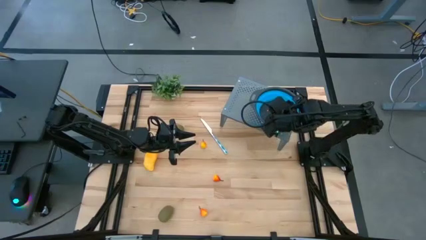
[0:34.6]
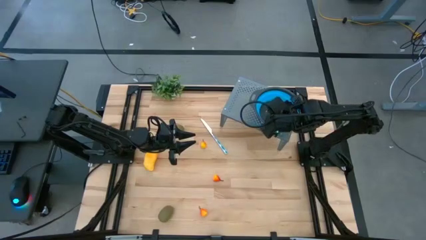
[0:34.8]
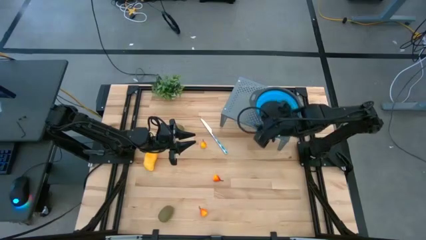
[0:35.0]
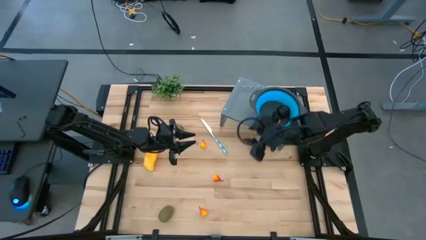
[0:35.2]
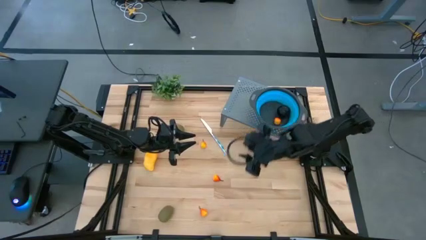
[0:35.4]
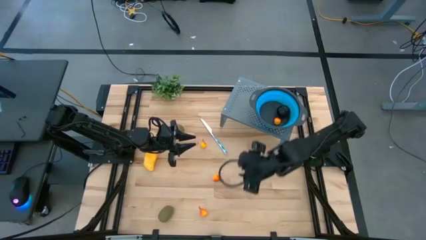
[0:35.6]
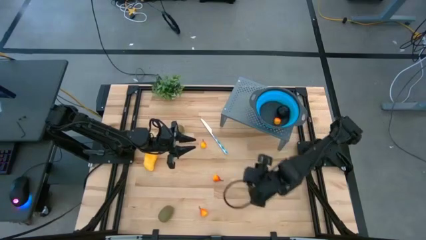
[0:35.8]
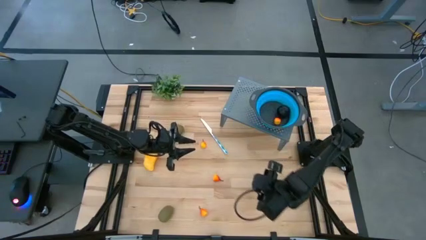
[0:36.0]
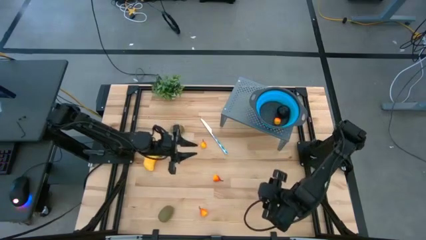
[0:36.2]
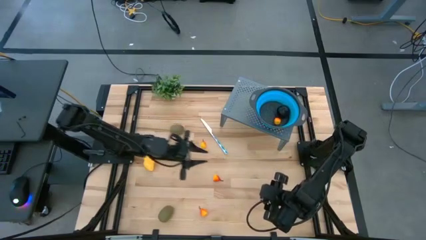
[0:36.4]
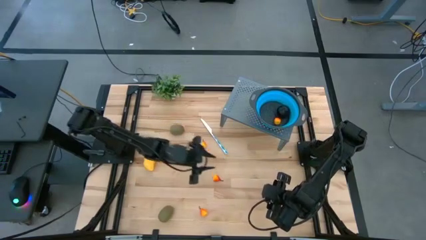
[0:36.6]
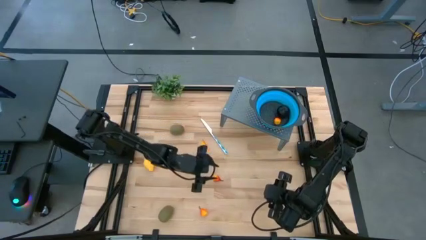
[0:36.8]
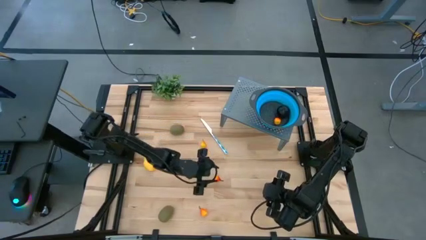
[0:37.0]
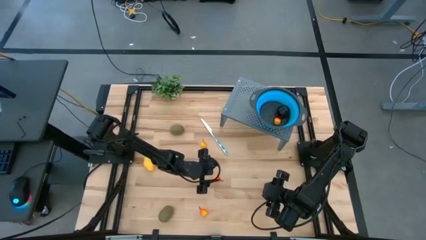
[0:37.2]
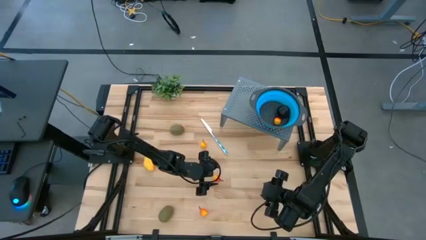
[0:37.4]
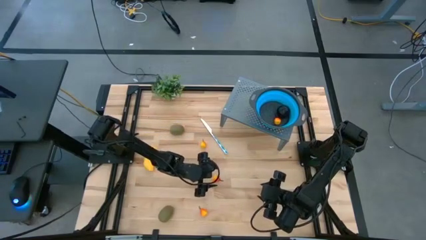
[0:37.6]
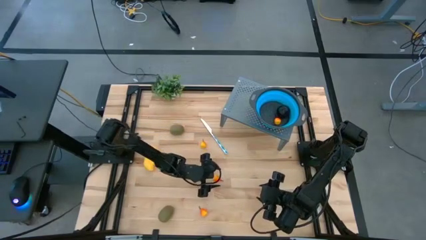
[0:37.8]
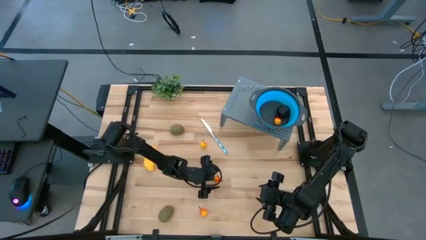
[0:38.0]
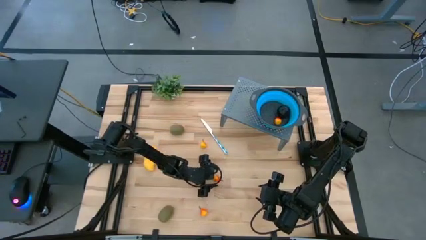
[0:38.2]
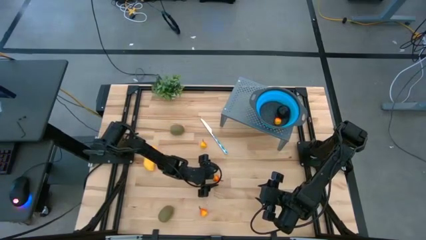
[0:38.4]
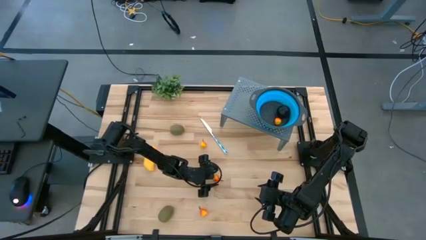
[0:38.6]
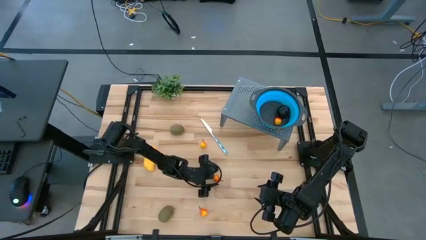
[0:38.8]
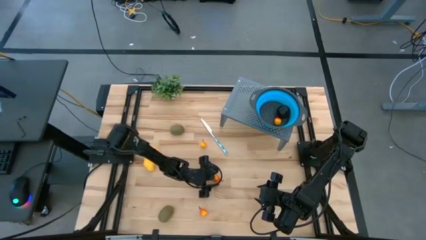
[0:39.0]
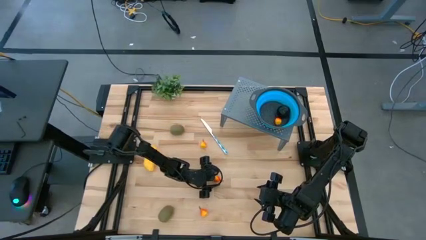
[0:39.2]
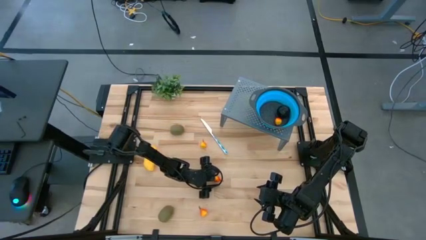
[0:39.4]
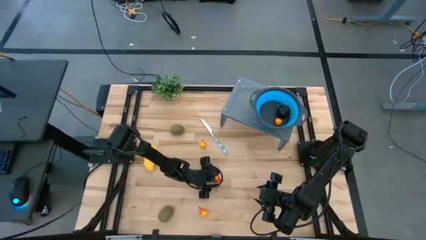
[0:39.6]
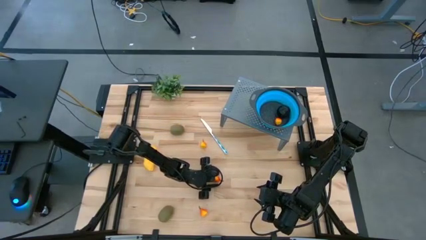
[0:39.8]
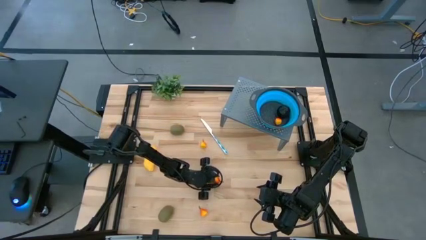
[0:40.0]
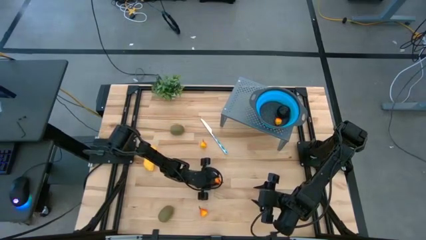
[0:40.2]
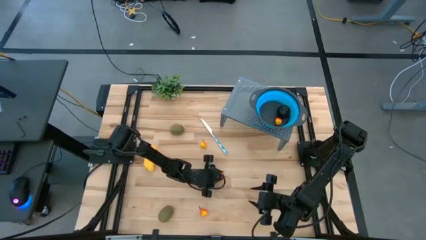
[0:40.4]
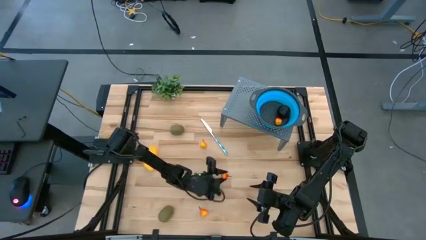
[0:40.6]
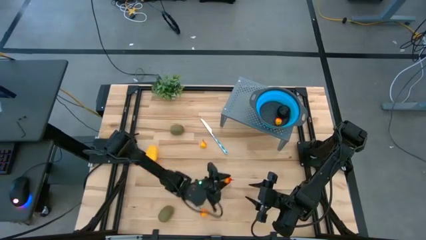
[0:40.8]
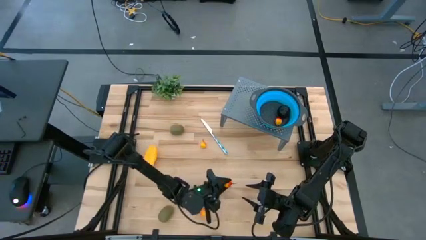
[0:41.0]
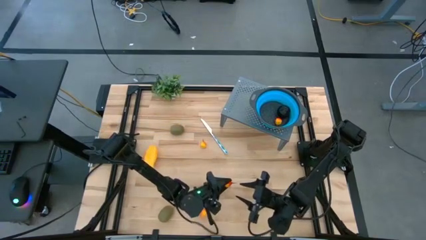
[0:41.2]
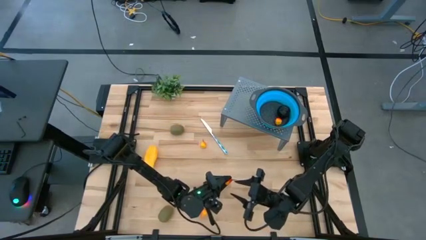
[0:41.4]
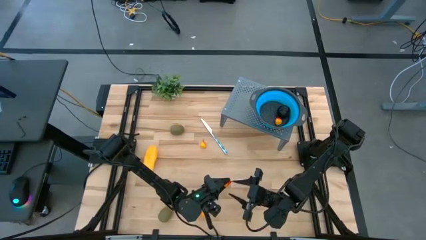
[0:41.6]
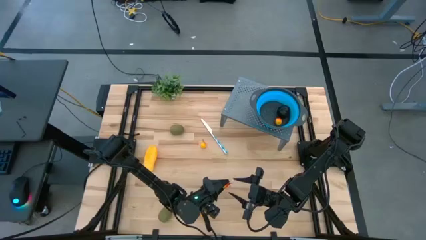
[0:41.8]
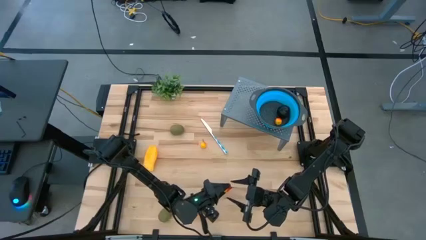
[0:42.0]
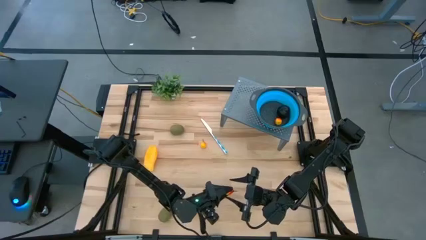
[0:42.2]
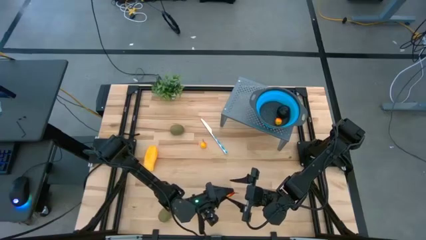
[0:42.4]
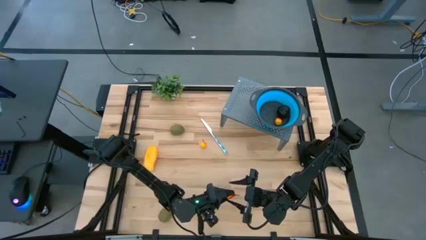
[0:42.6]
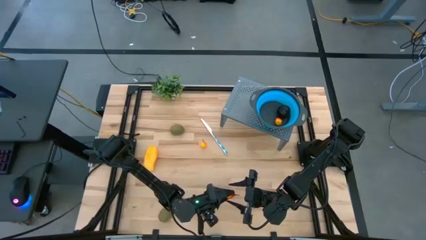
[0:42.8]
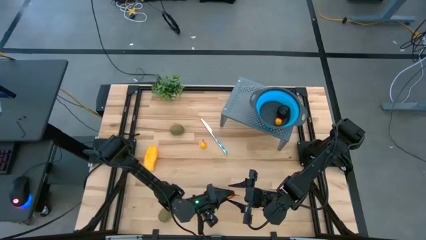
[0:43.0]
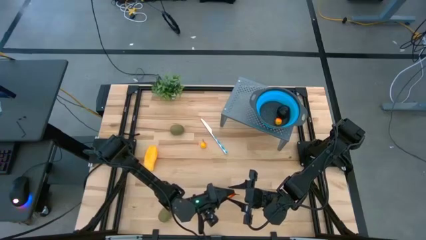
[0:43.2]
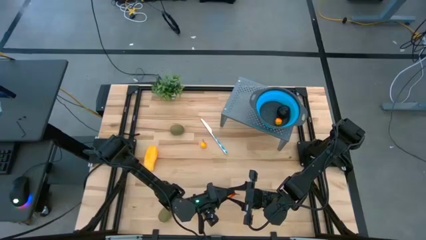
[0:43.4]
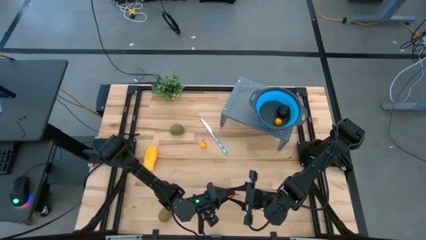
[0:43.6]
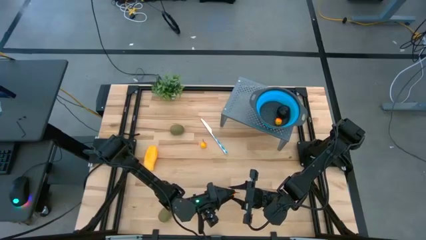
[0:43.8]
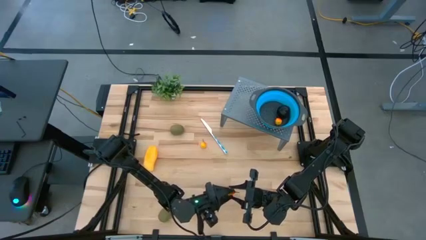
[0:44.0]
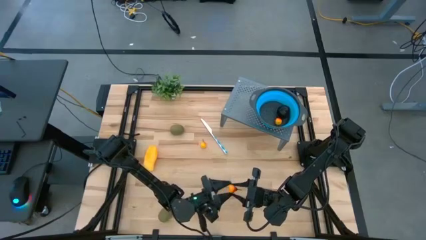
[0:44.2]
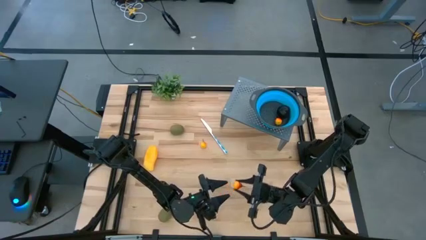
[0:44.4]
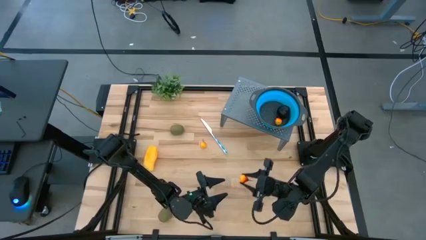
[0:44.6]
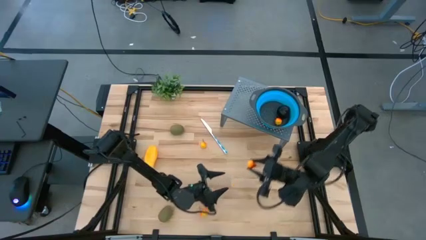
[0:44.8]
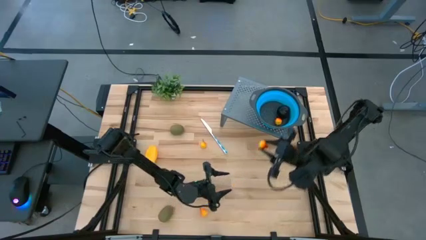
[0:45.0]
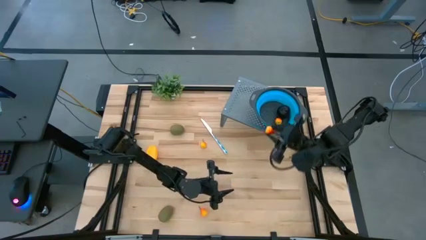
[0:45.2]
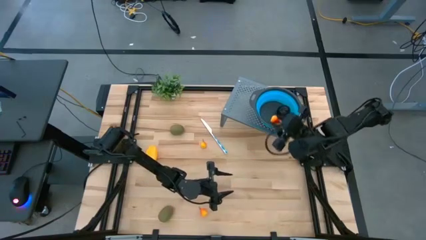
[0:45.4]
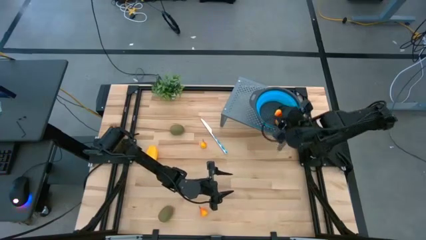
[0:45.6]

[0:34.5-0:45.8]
Task: Pick & Place Fruit
Put the peach into the blue strainer bowl on the shelf

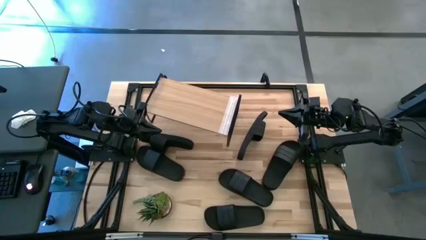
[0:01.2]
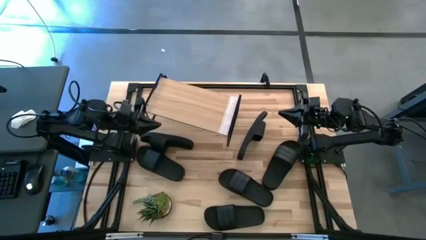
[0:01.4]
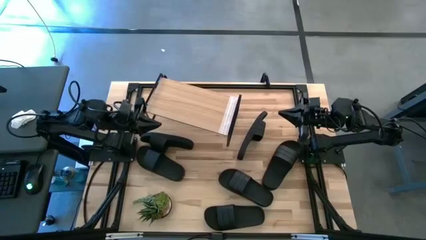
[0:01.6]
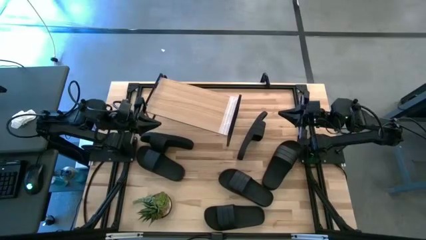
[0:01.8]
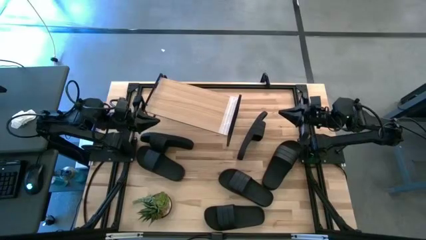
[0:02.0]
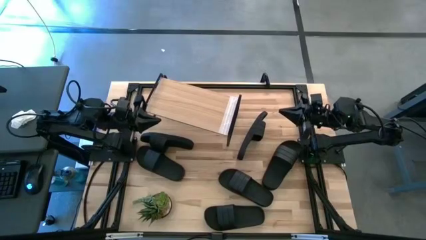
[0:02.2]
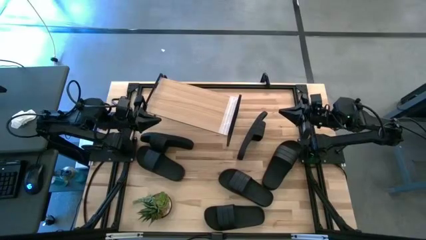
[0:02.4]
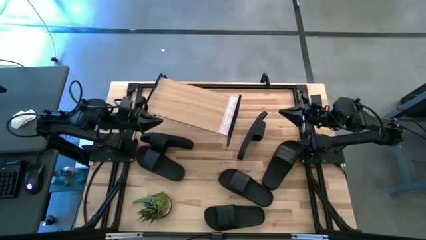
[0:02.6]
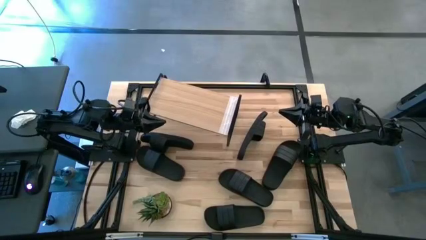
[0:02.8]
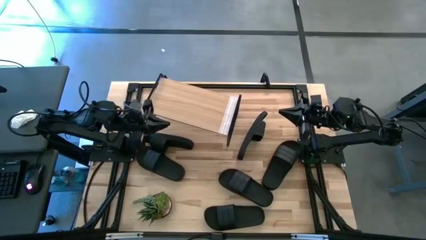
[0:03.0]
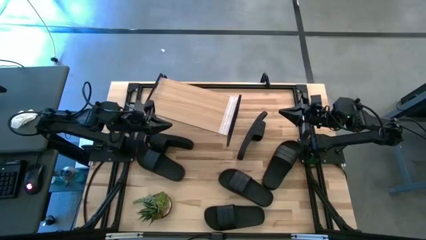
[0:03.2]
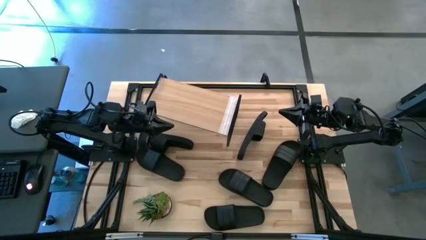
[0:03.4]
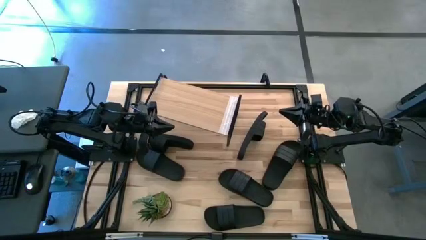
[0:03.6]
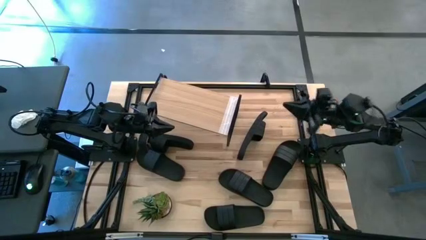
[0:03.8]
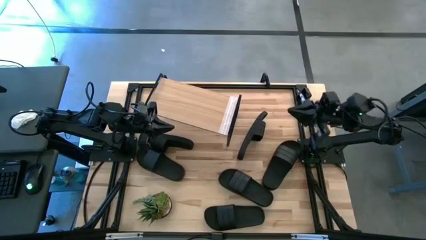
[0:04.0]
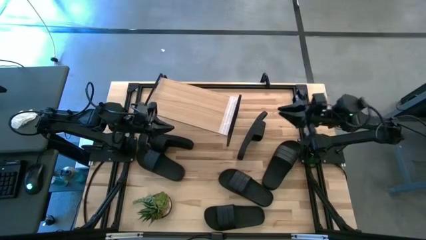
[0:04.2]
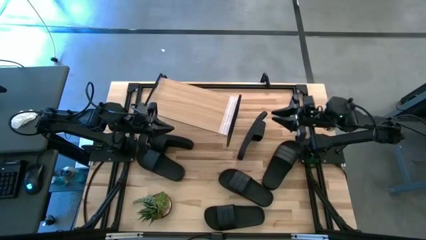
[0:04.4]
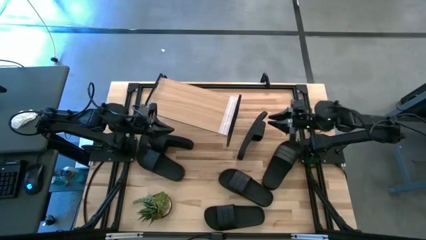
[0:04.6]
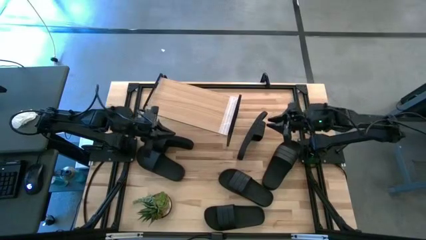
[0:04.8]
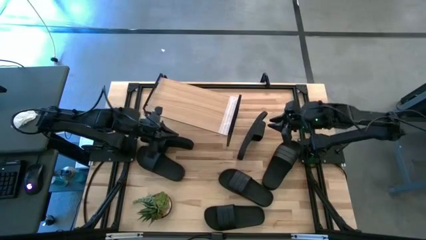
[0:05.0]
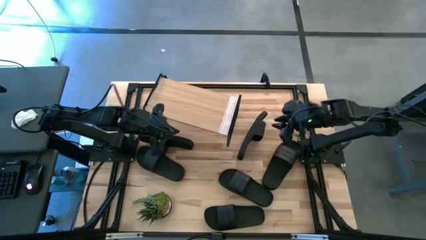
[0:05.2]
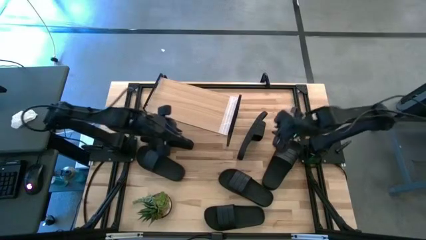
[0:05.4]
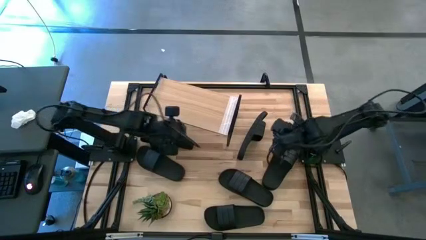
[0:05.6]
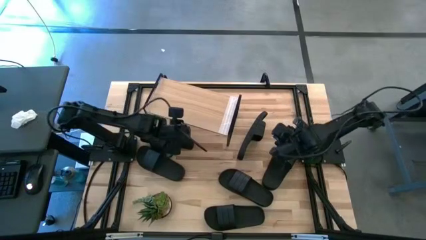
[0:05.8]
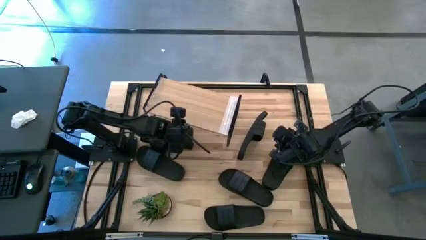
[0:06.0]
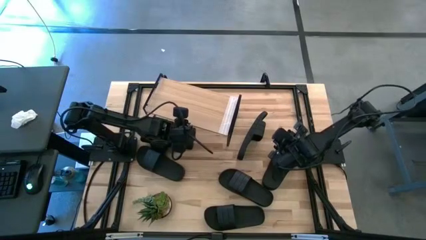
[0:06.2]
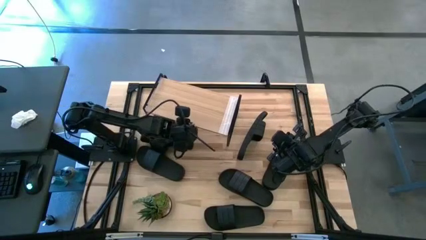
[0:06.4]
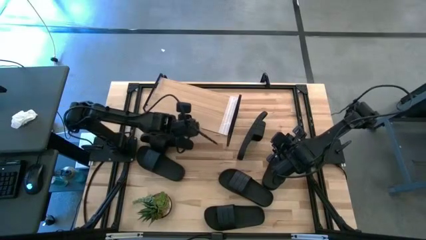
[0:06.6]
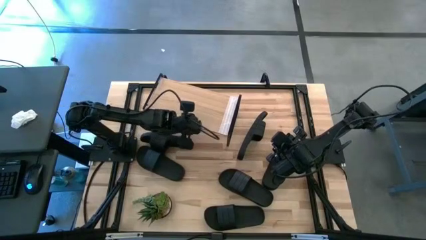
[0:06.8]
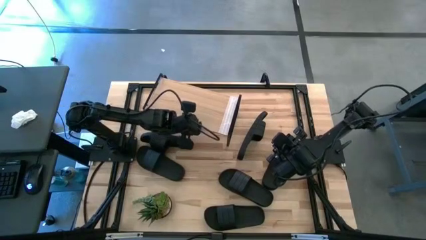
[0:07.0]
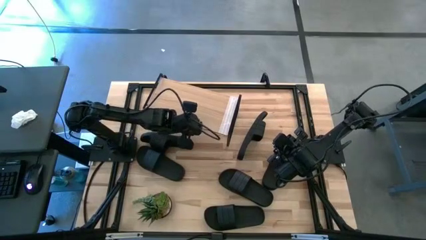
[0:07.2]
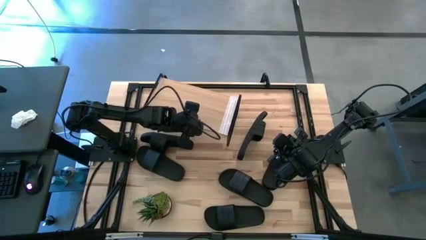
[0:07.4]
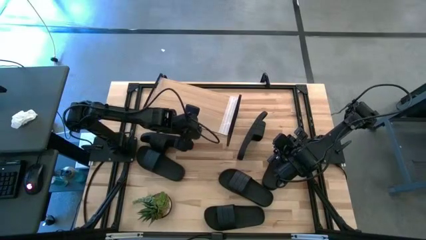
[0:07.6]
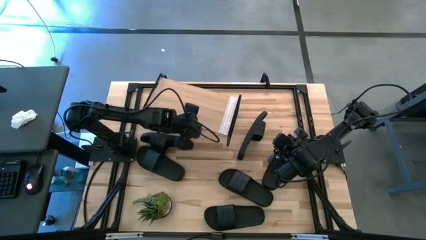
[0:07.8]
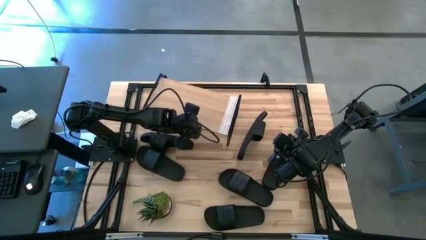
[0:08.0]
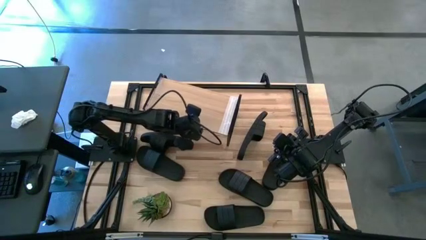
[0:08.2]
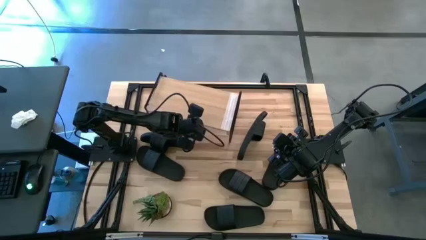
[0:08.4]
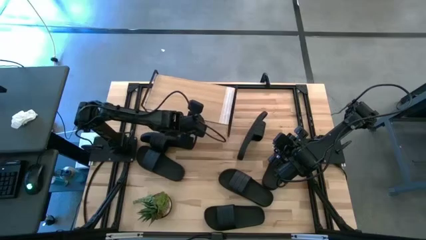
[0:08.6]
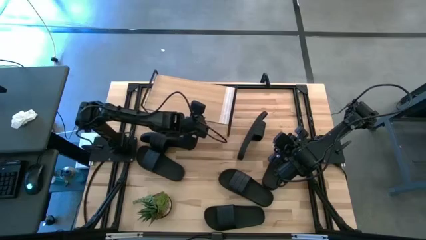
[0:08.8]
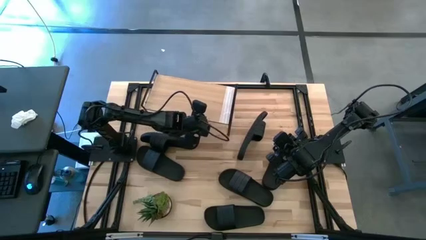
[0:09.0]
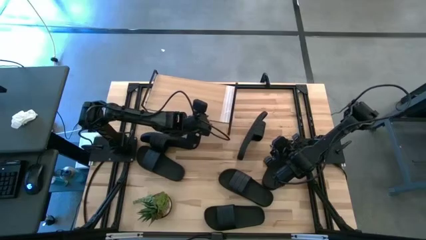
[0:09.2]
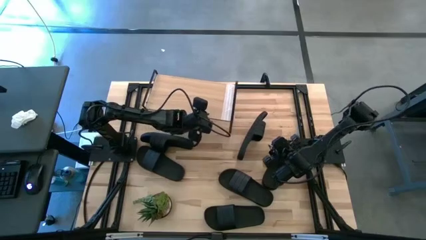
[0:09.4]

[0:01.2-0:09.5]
Task: Pick and place slides into the shelf
Adjust the shelf
